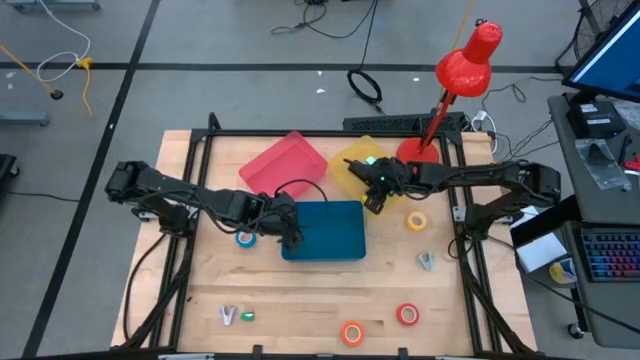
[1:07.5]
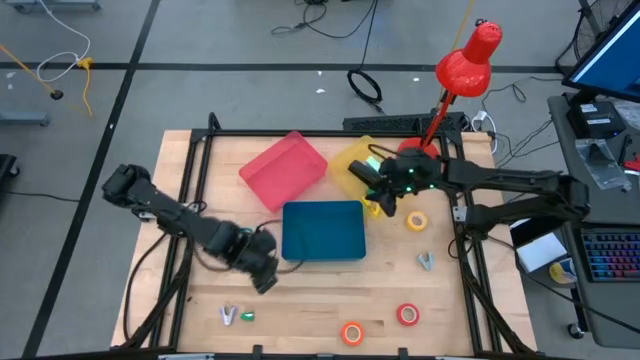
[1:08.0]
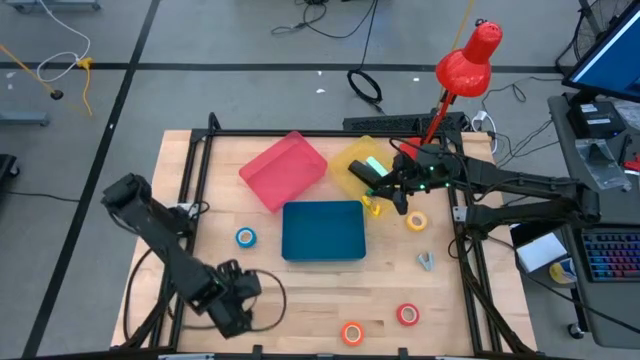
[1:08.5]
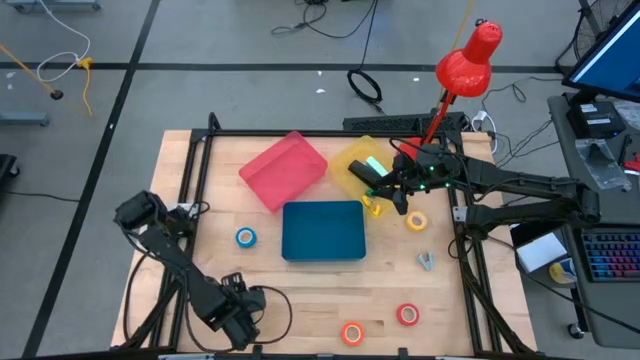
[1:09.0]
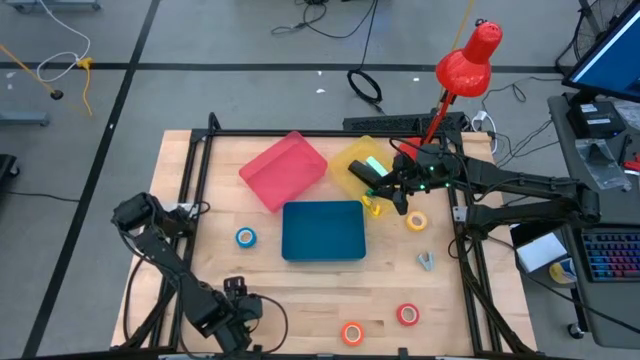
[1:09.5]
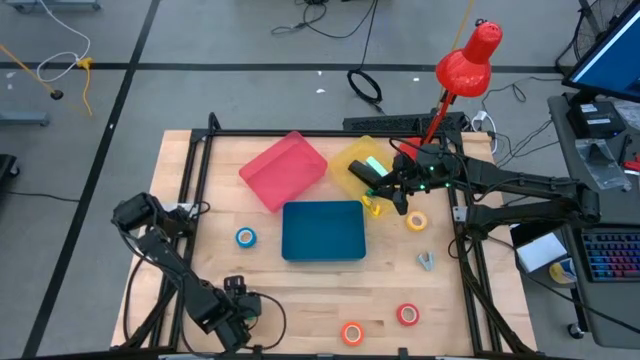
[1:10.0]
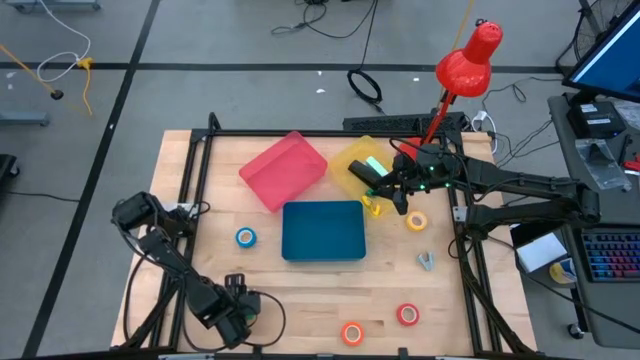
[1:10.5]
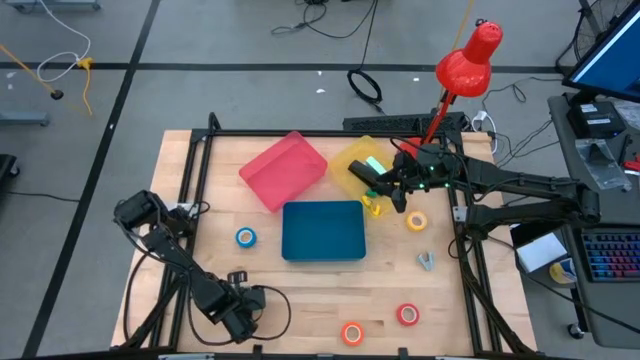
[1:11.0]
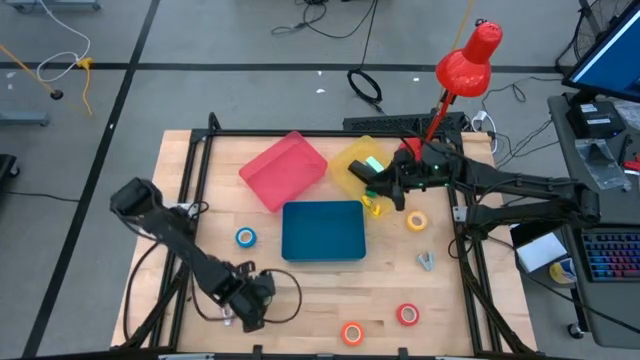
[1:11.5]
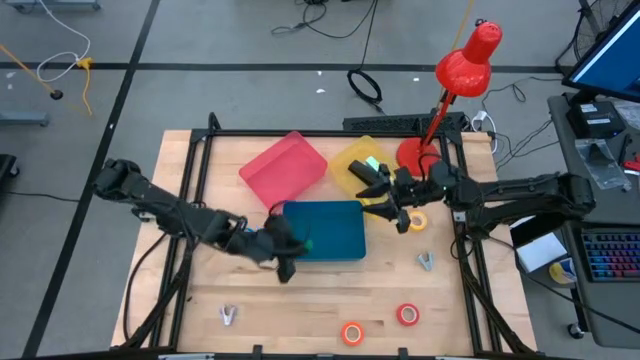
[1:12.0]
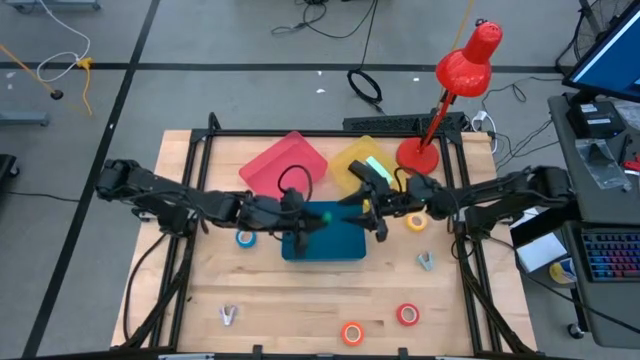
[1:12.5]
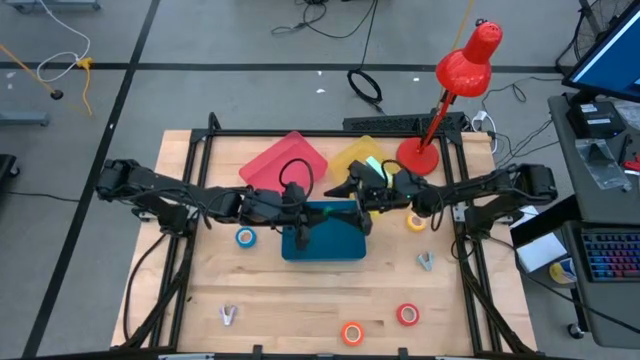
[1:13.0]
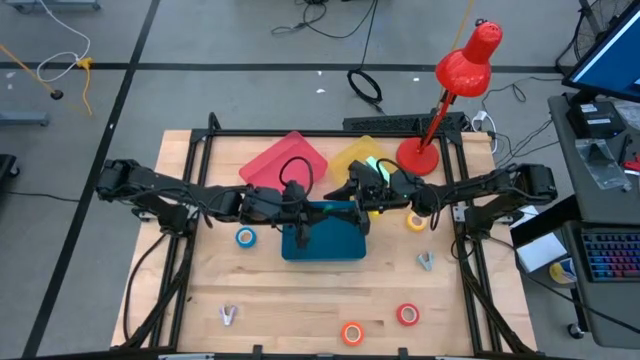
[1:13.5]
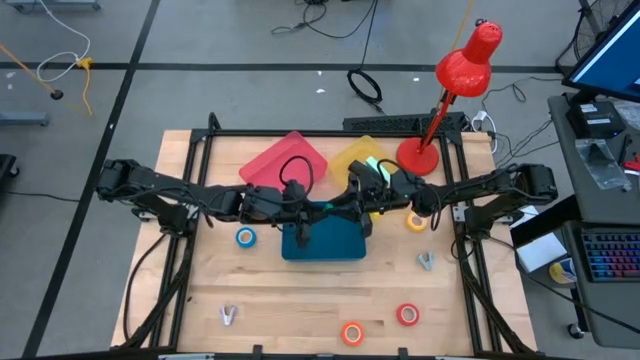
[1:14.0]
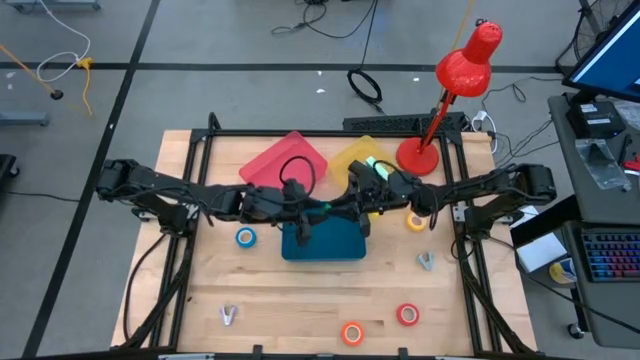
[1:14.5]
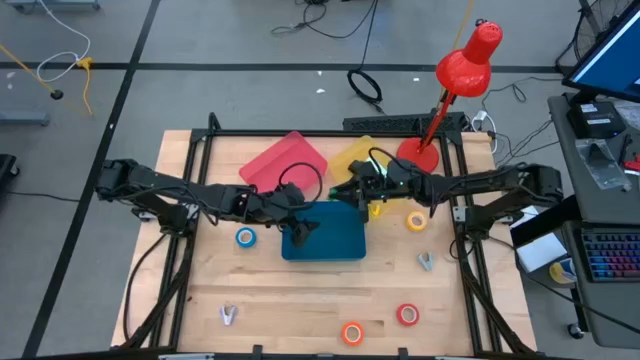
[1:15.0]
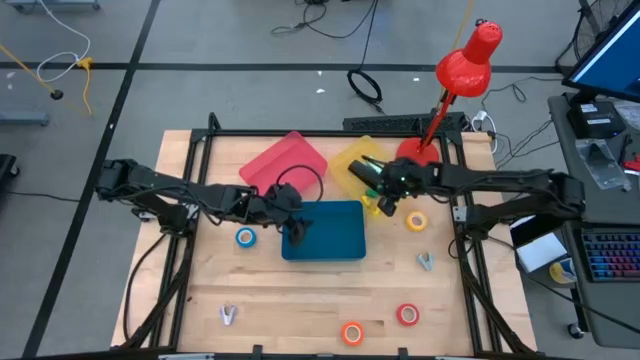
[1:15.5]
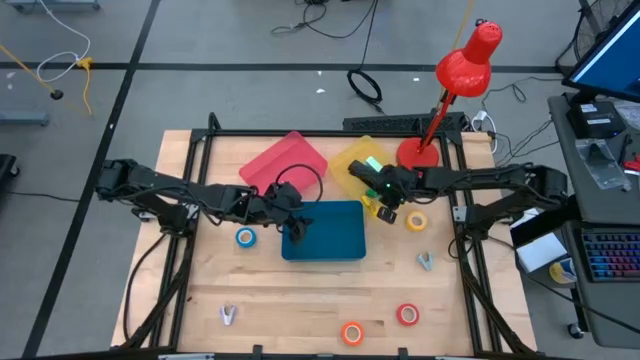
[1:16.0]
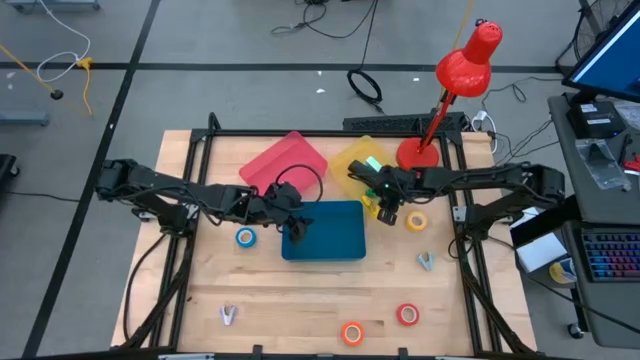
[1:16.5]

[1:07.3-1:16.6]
Task: Pick and place Stapler, Stapler remover, tape
Put the green stapler into the yellow bin

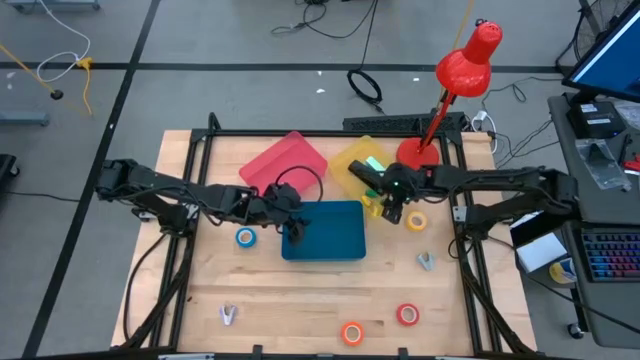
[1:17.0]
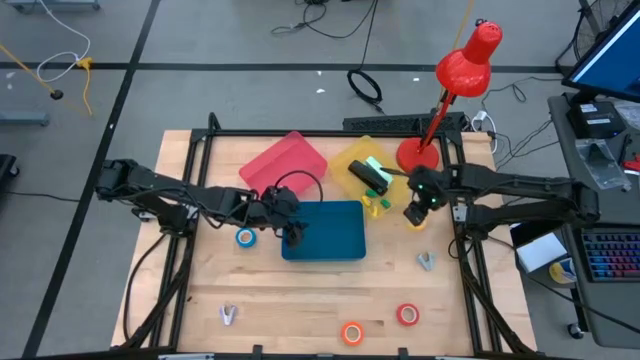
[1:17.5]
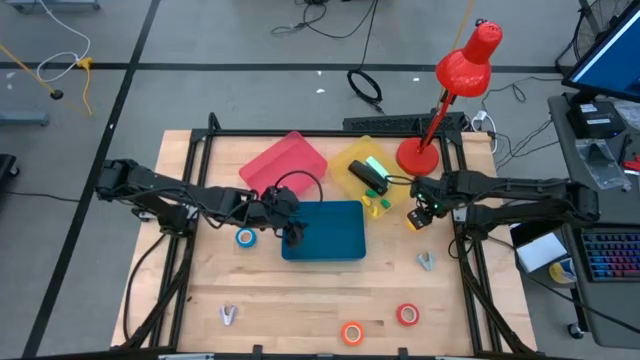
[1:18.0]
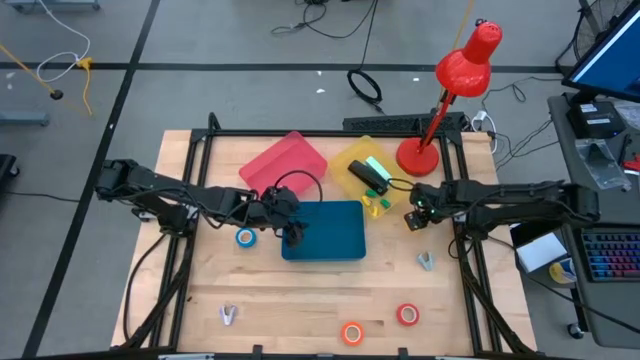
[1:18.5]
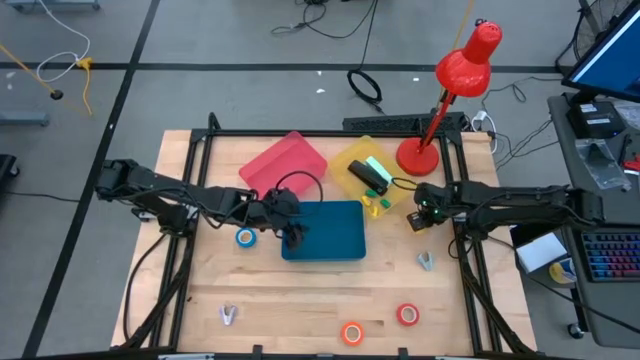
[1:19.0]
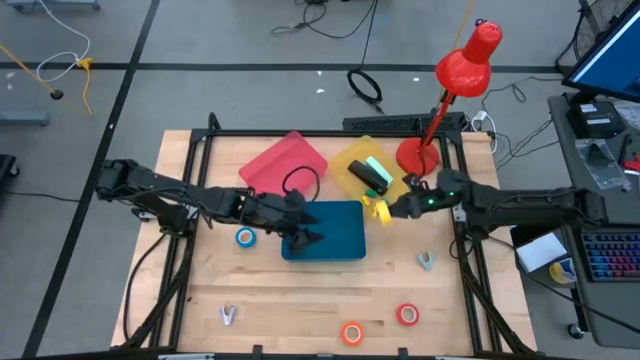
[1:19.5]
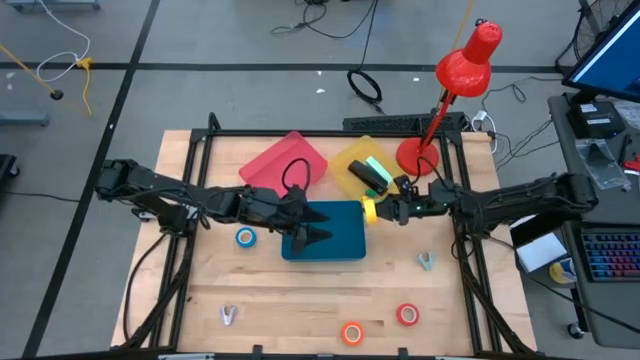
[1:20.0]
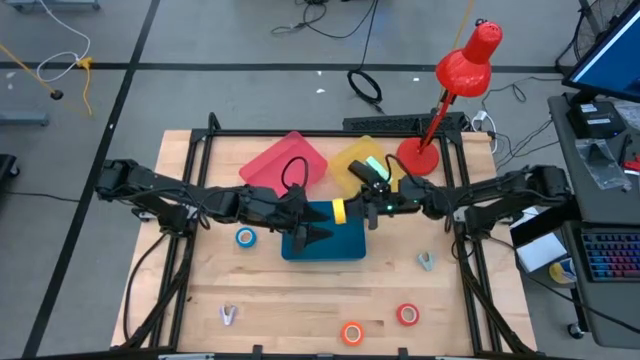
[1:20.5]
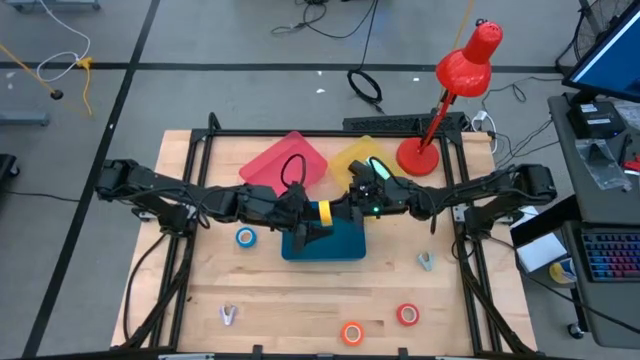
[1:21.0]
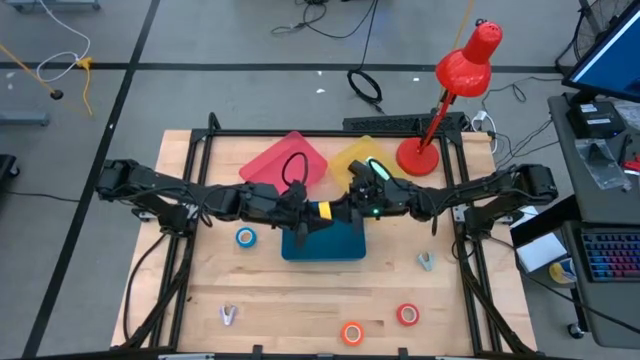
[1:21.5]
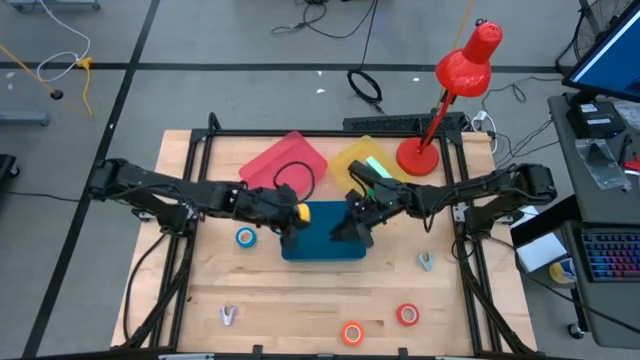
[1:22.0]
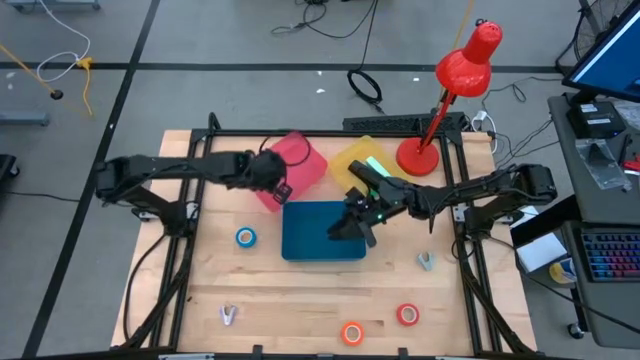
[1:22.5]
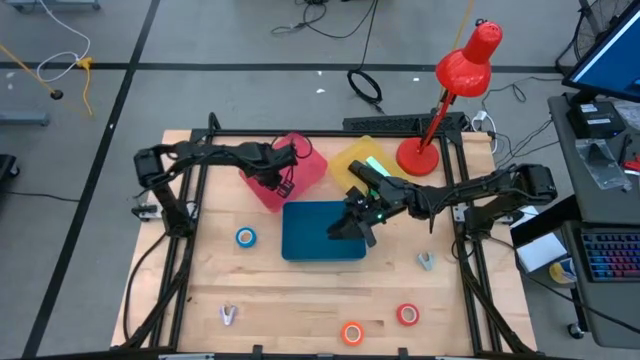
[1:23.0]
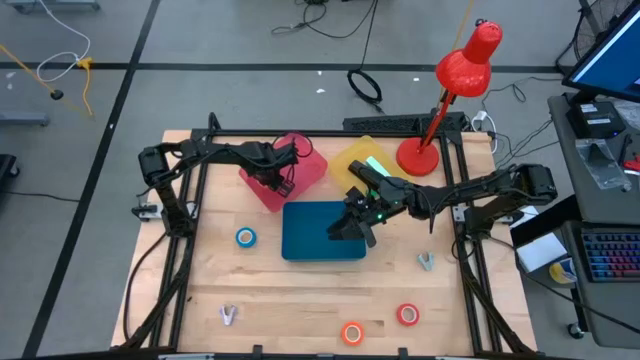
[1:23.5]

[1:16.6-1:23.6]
Put the yellow tape into the pink bin

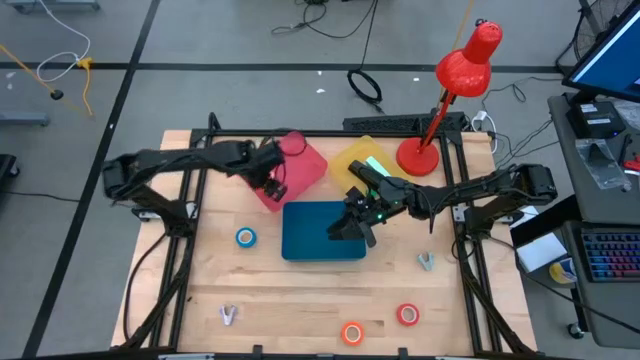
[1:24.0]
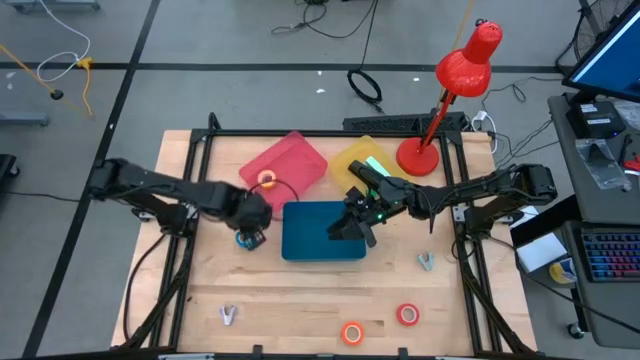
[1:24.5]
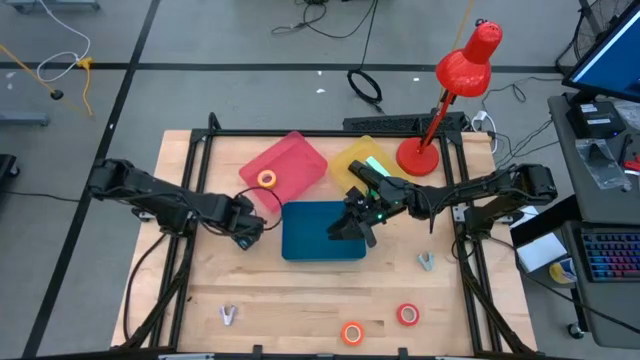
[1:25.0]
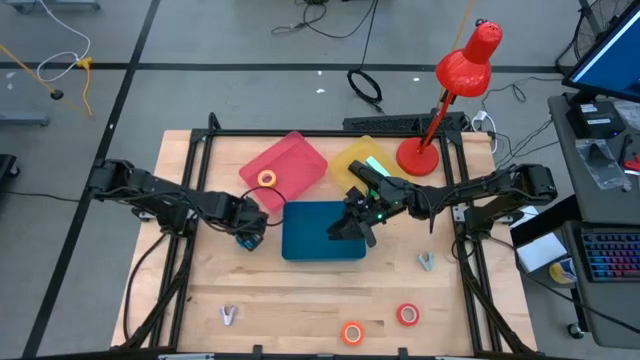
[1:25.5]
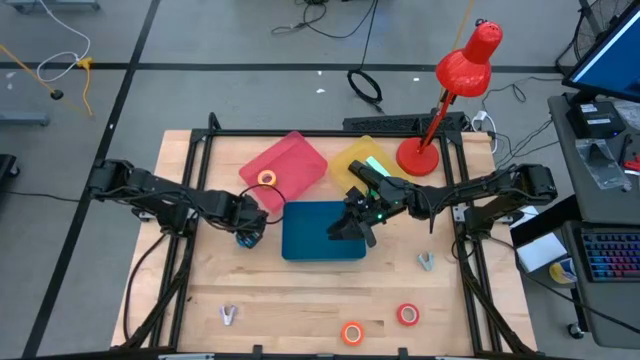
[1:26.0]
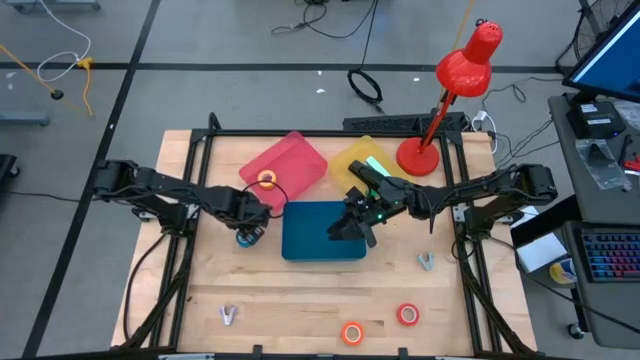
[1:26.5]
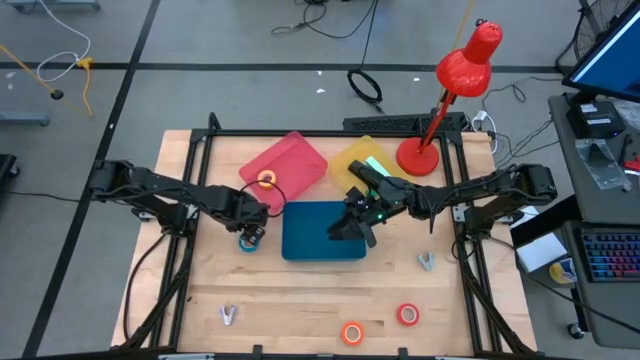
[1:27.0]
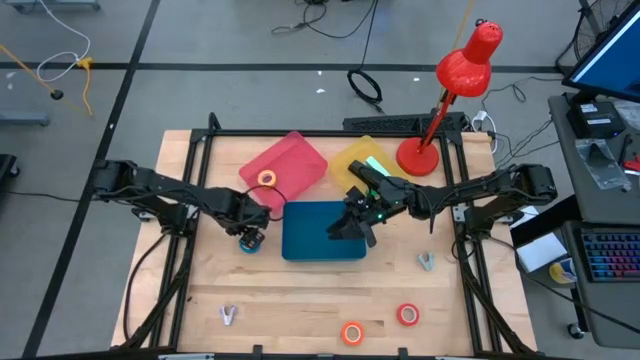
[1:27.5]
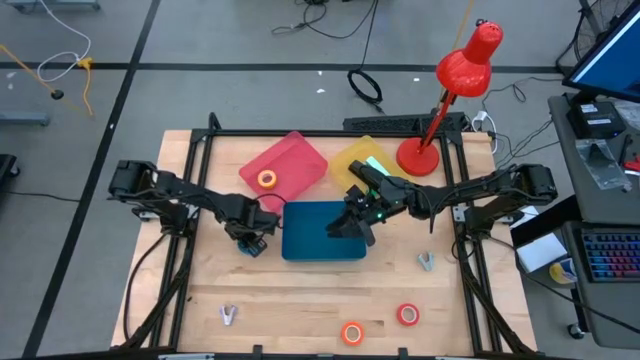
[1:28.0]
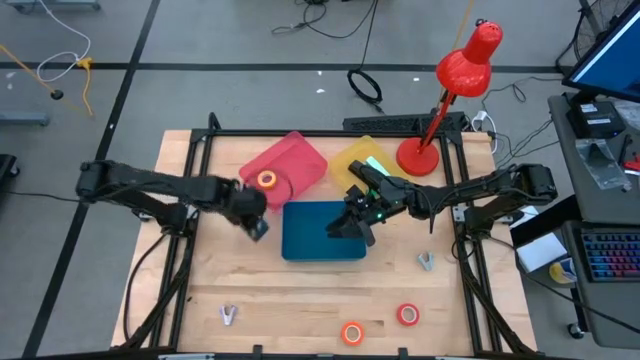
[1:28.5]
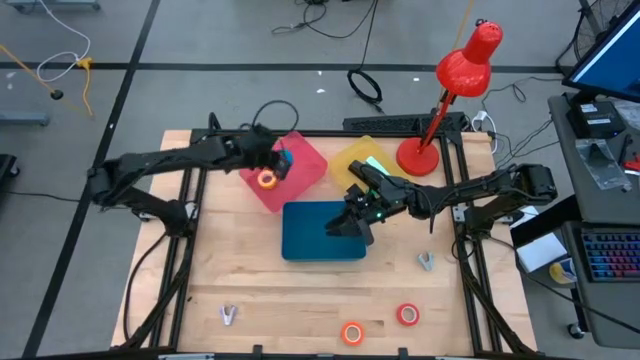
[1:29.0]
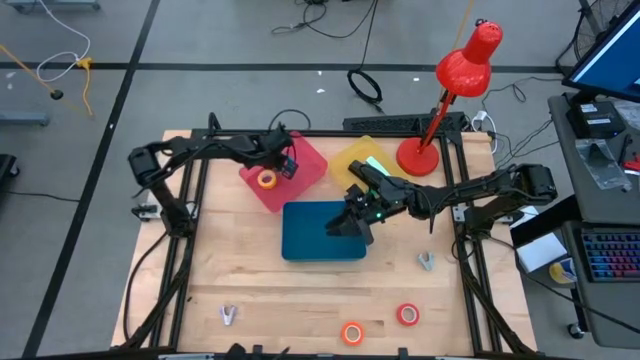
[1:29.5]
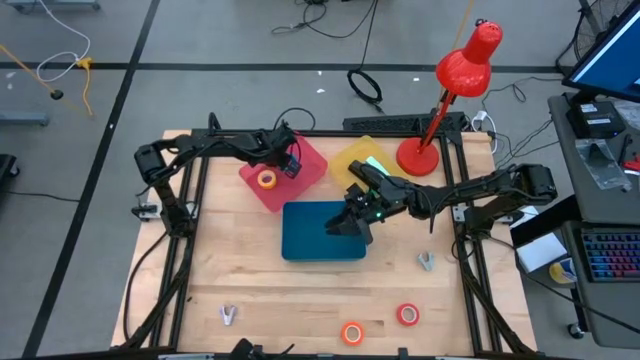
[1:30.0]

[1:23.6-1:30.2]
Put the blue tape into the pink bin
